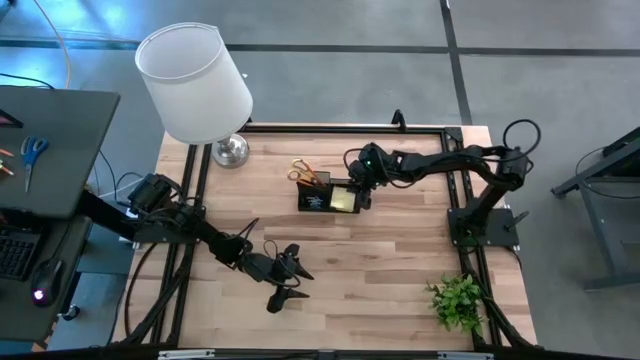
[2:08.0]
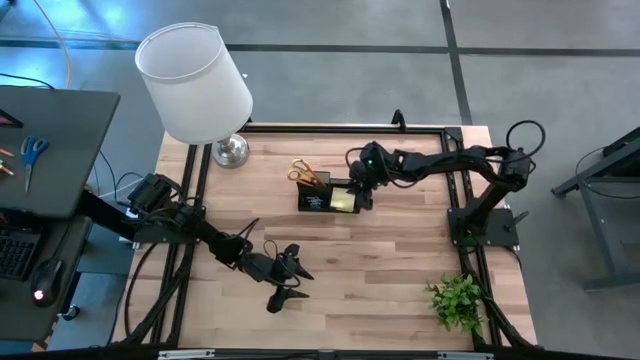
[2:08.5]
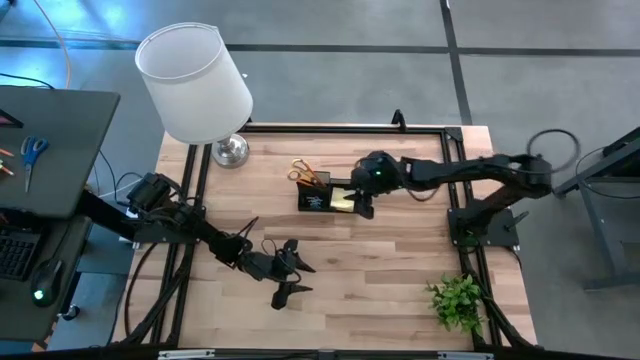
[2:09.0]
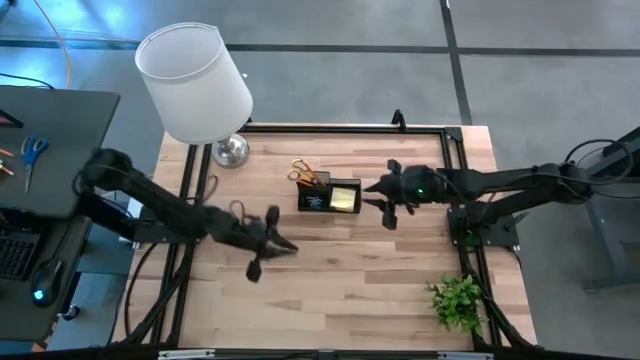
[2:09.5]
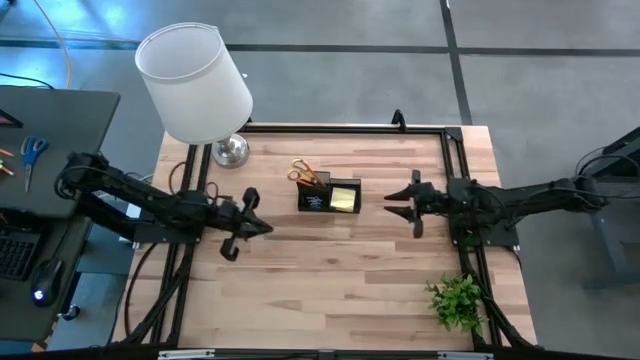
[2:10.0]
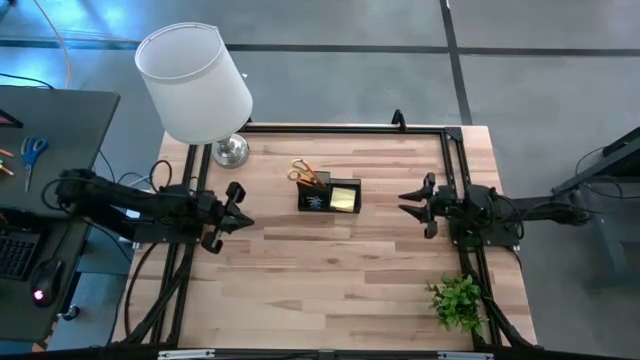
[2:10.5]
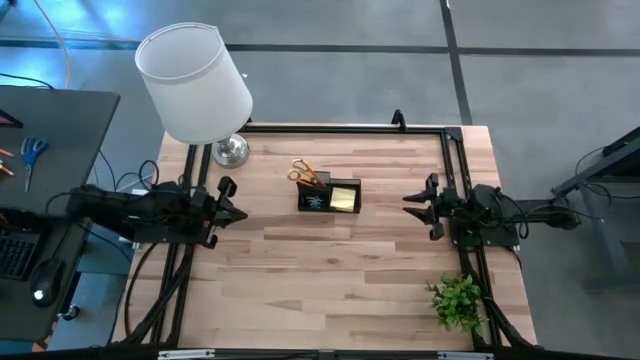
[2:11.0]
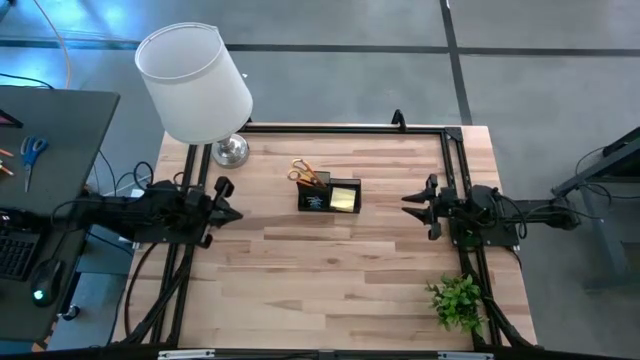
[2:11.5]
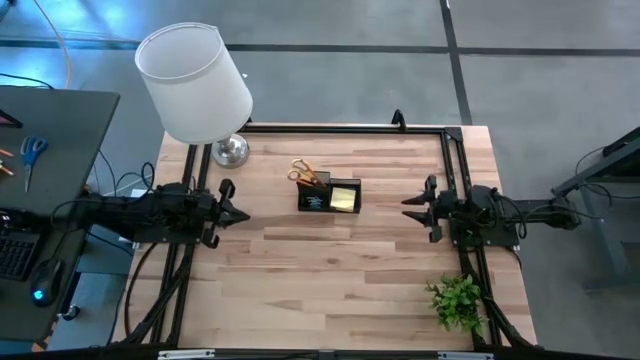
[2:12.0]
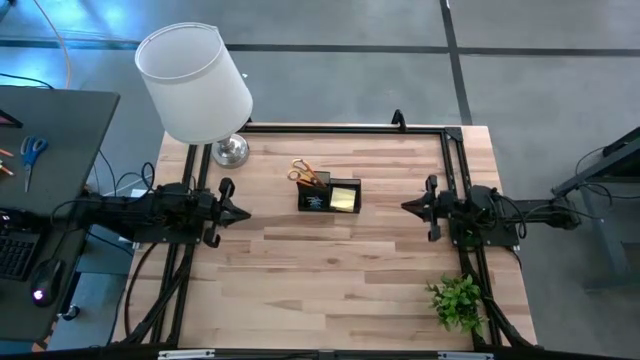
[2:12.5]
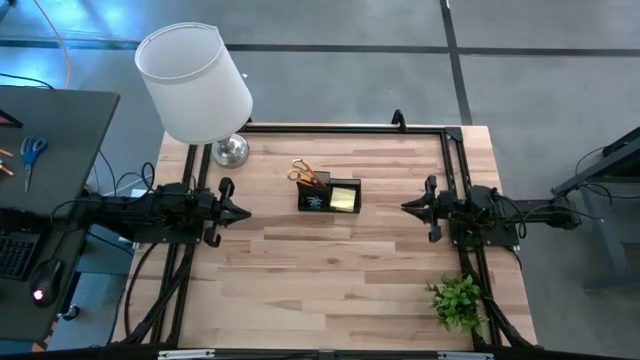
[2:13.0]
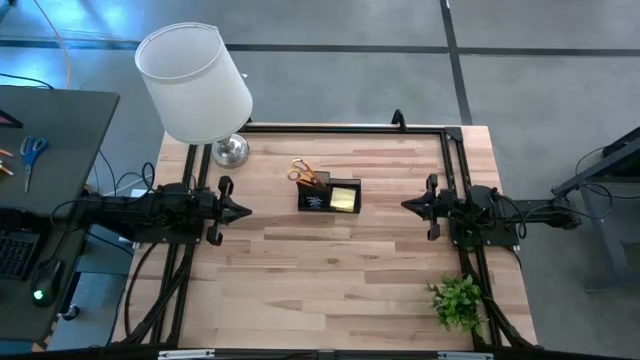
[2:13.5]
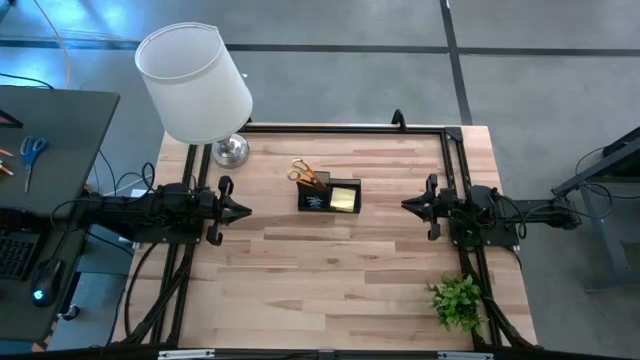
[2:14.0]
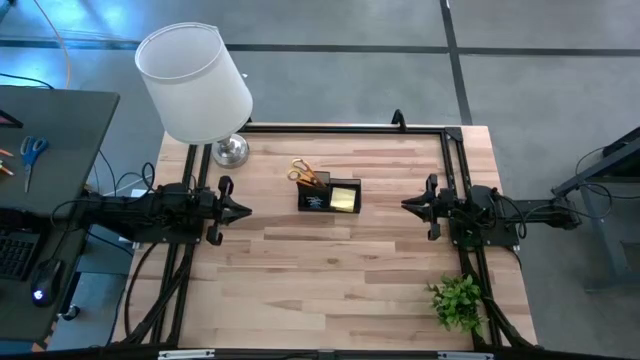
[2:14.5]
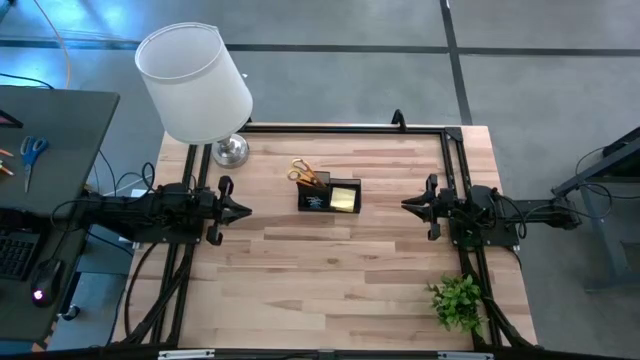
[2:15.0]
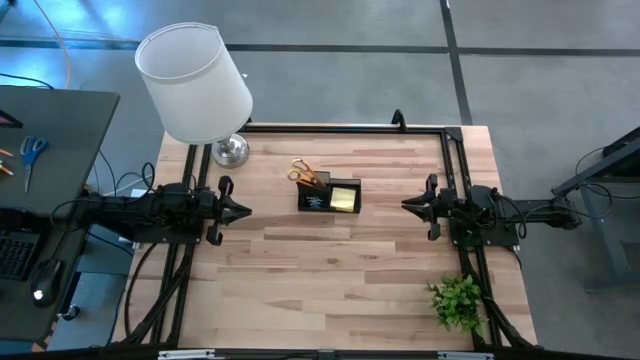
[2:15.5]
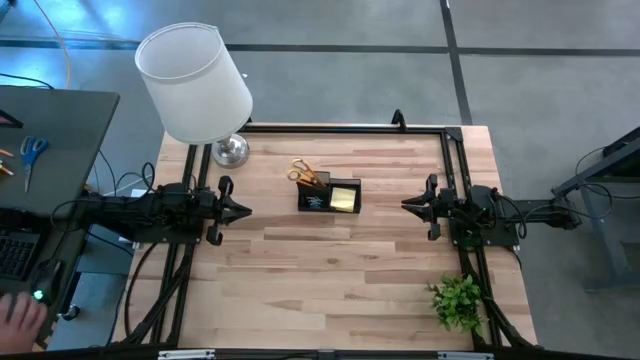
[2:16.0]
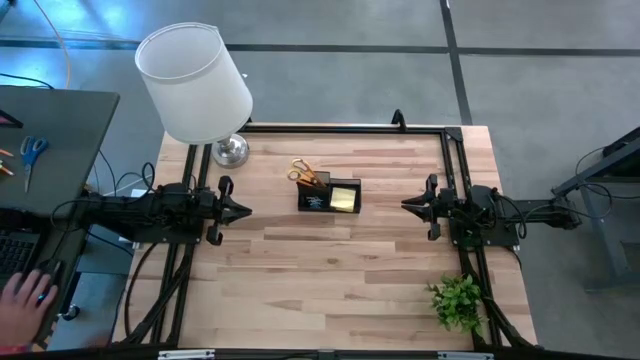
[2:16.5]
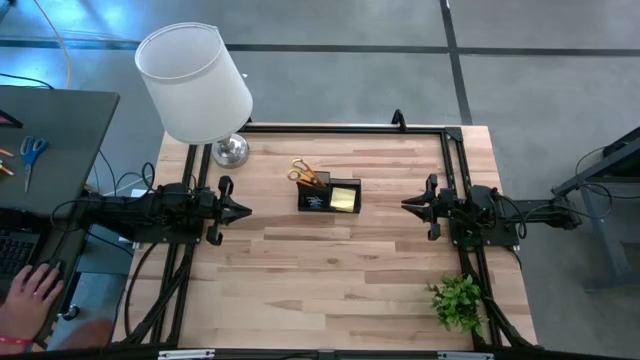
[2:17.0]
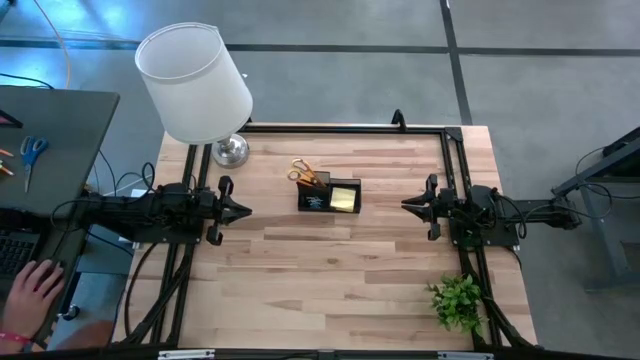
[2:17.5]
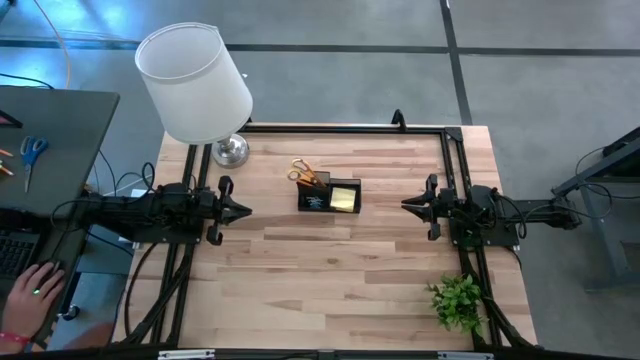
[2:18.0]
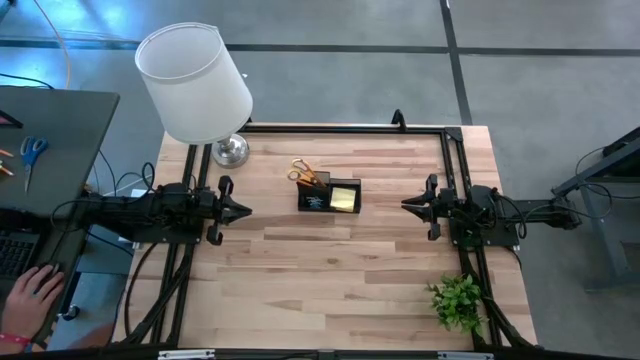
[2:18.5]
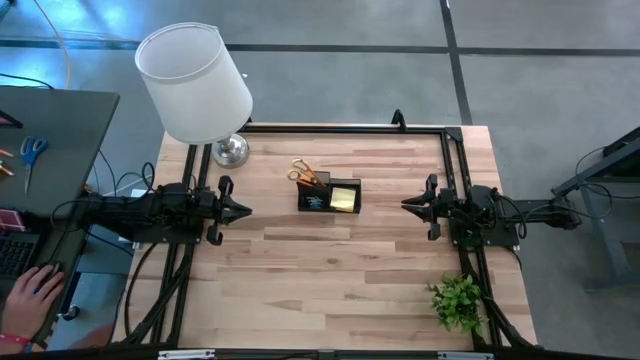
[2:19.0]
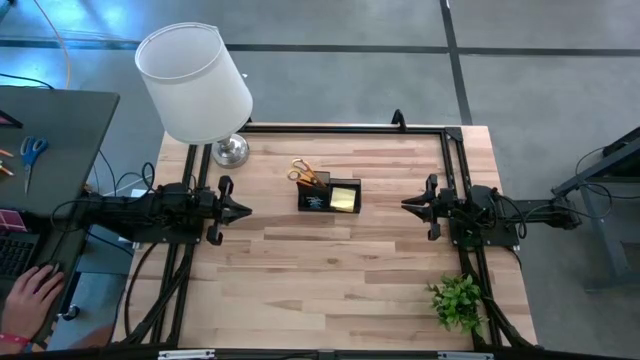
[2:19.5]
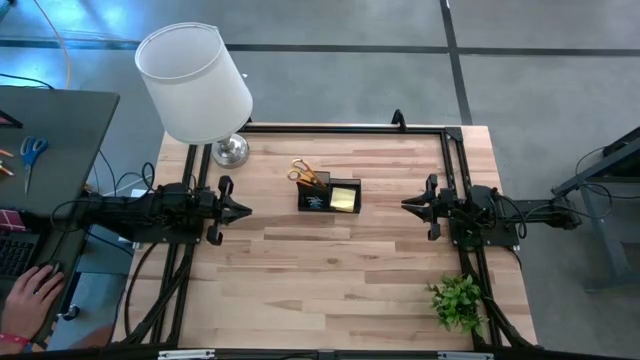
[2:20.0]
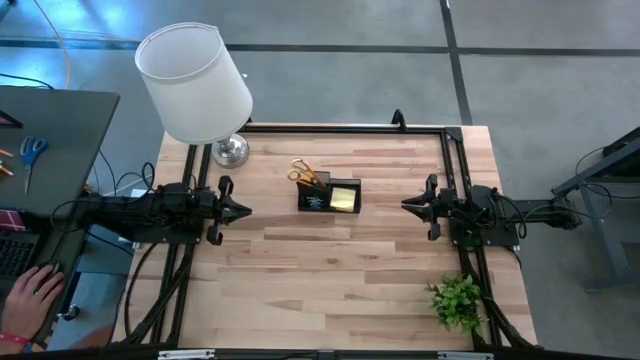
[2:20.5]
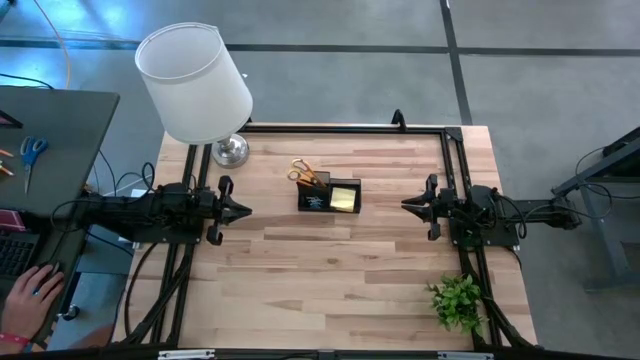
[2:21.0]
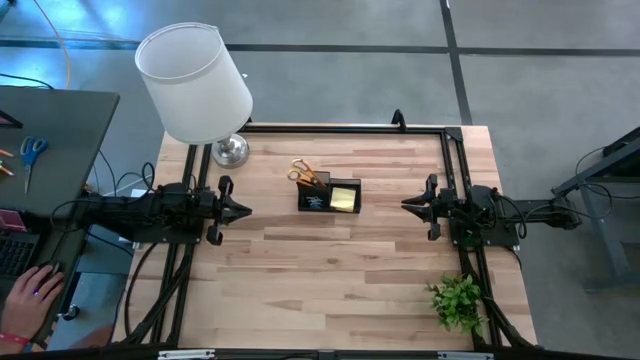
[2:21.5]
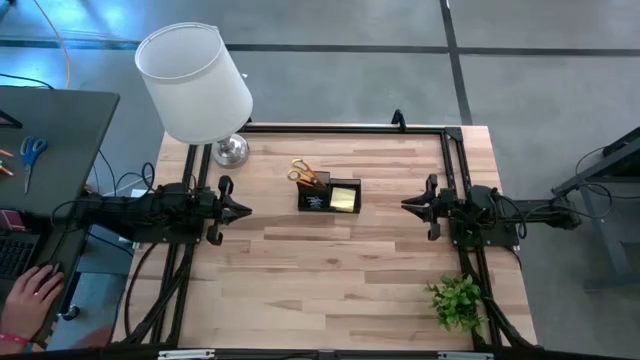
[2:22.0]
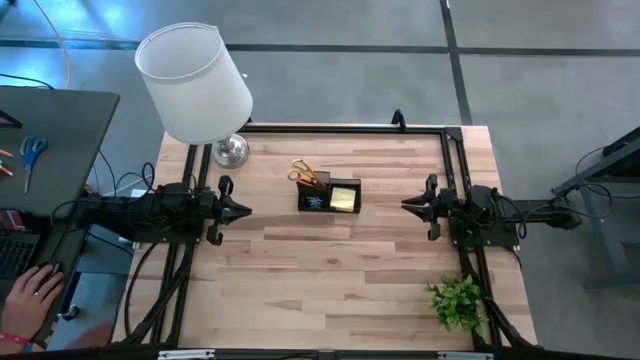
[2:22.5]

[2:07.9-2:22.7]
Task: Pick and place office supplies into organizer
Return to Home Position

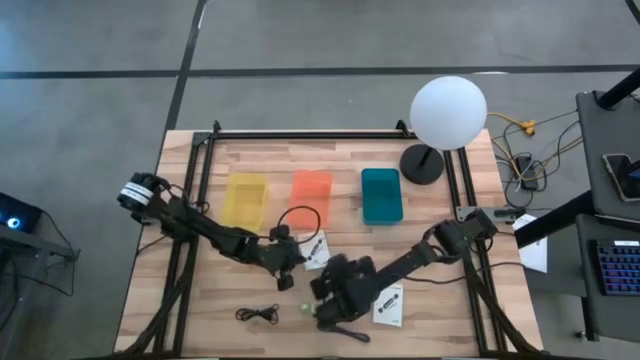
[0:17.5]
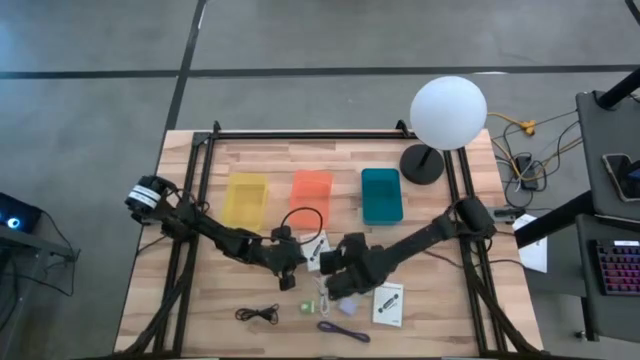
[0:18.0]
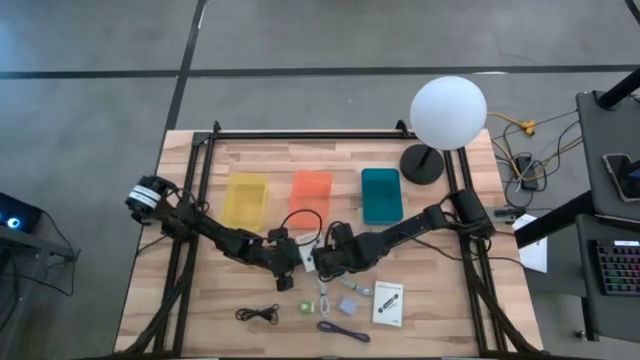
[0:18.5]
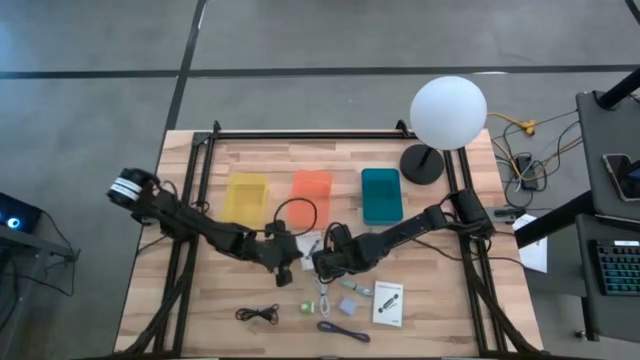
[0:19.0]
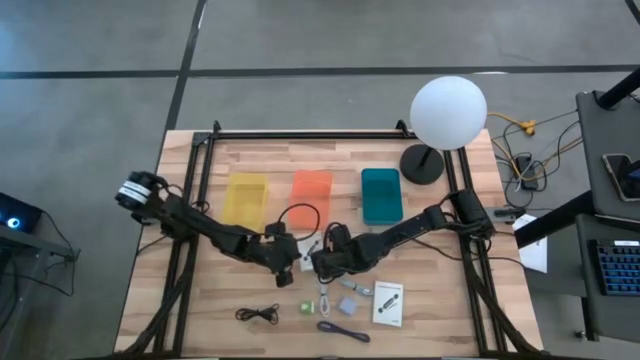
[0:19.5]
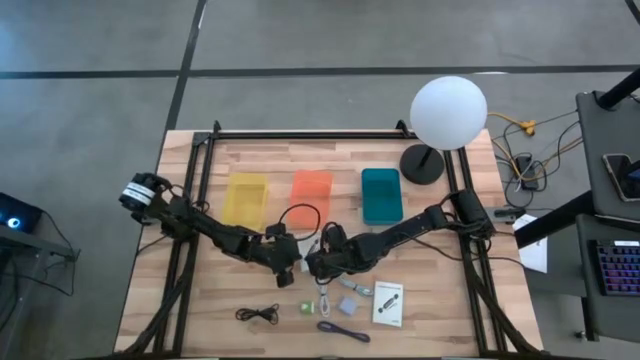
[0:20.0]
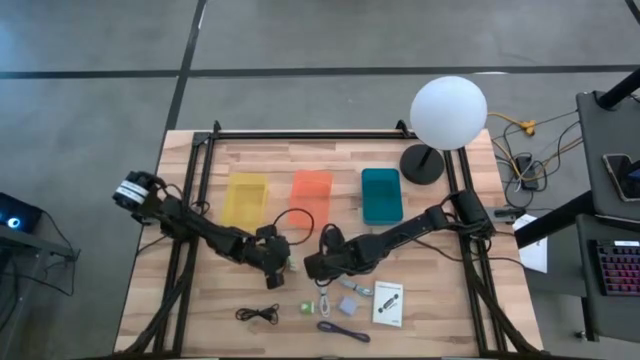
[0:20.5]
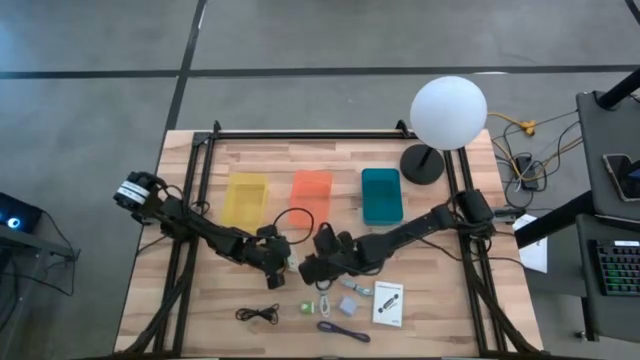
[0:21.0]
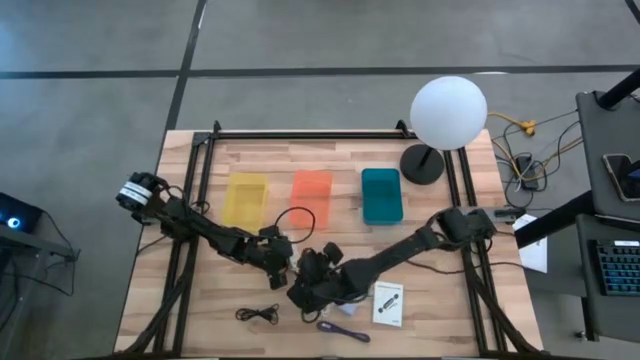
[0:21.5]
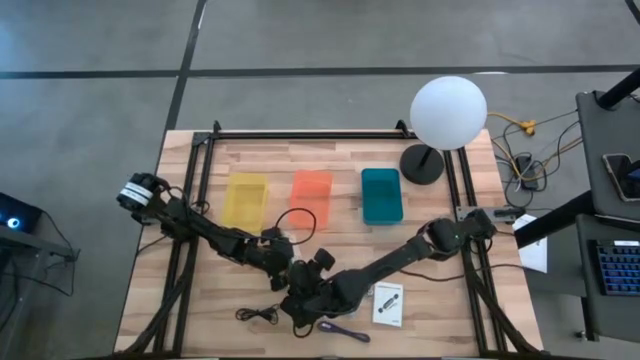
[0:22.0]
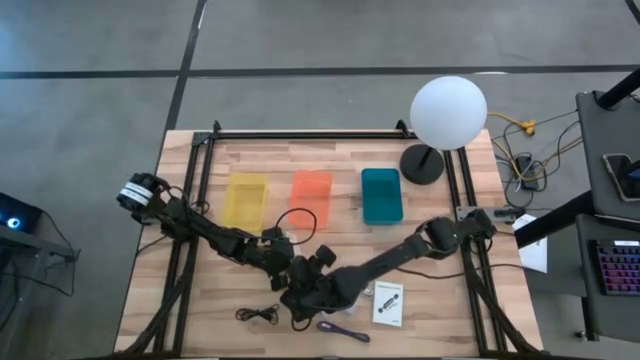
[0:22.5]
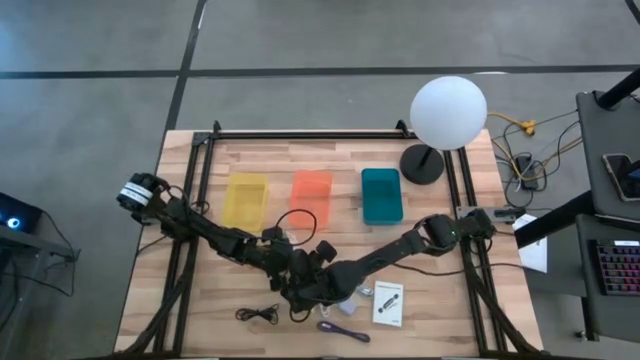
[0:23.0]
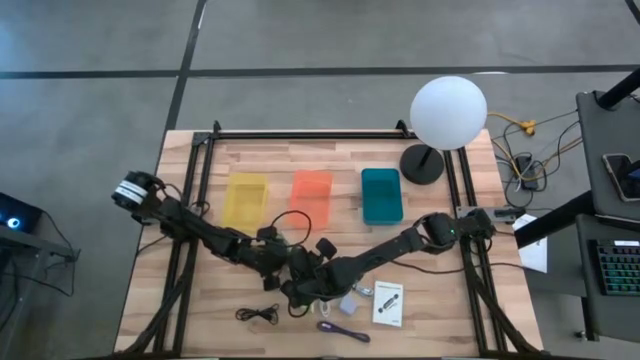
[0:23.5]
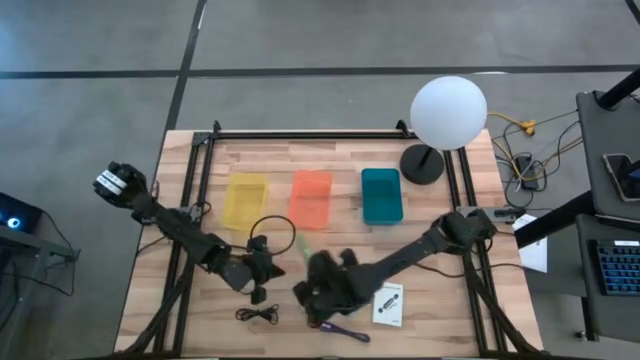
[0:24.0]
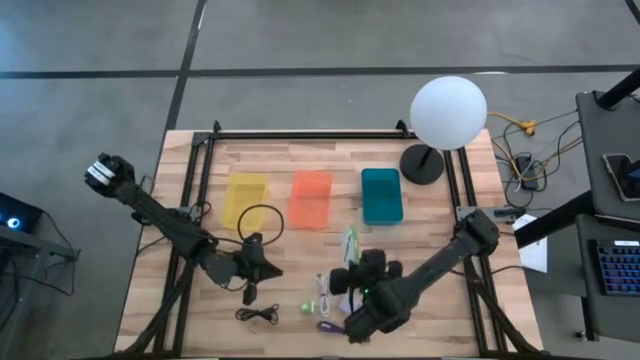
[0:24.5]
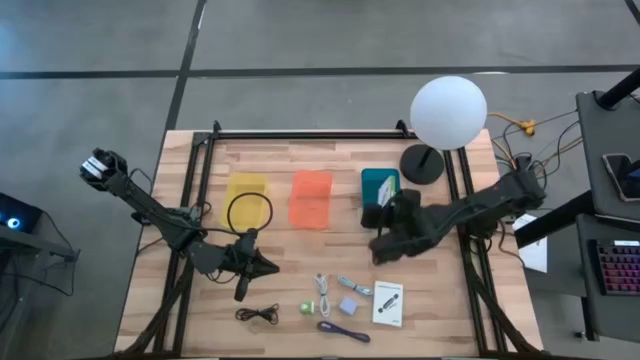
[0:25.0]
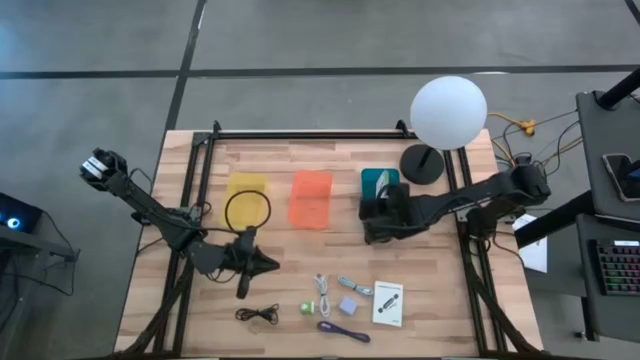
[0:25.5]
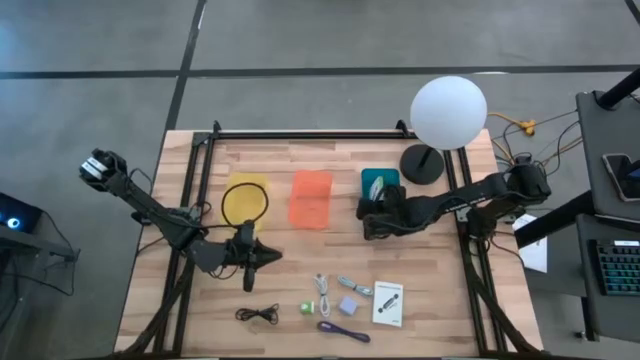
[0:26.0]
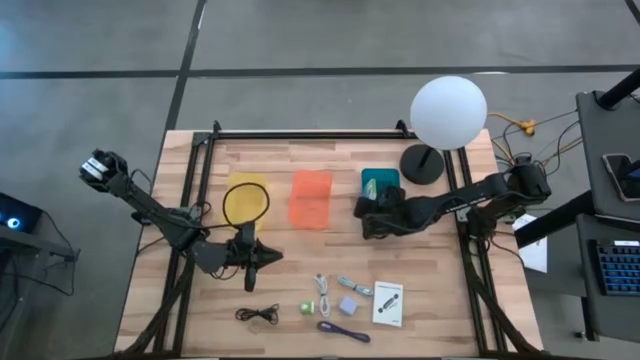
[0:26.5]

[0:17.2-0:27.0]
Task: Pick and place items into bin
Put the left white card reader box into the blue bin
